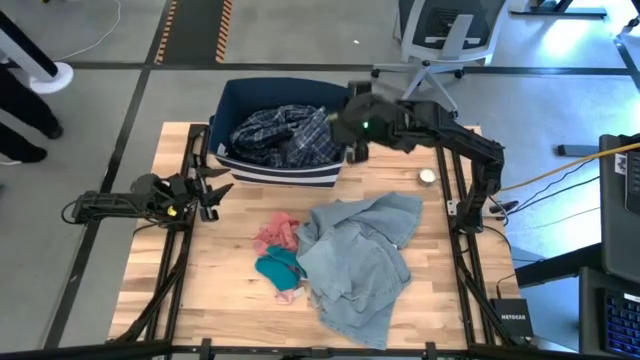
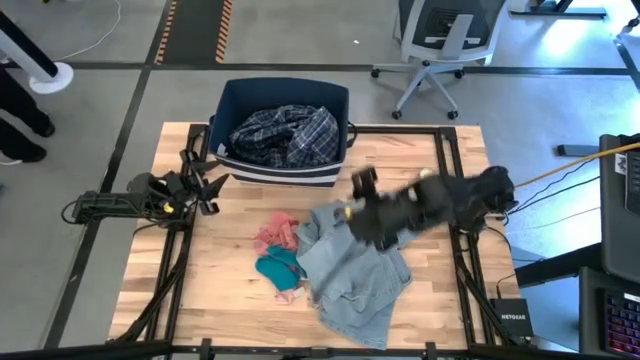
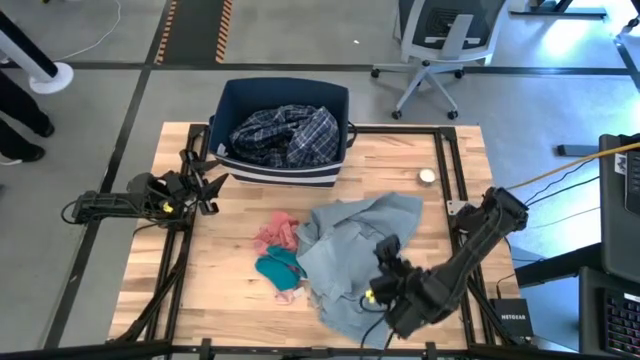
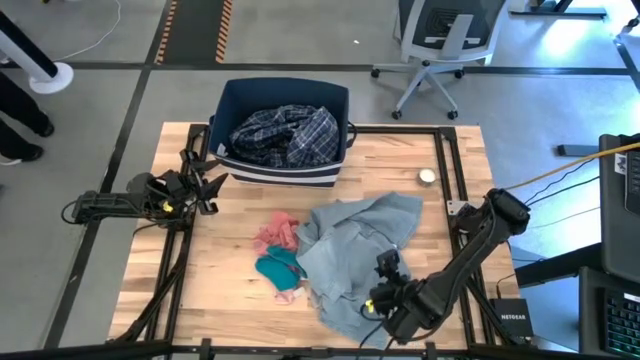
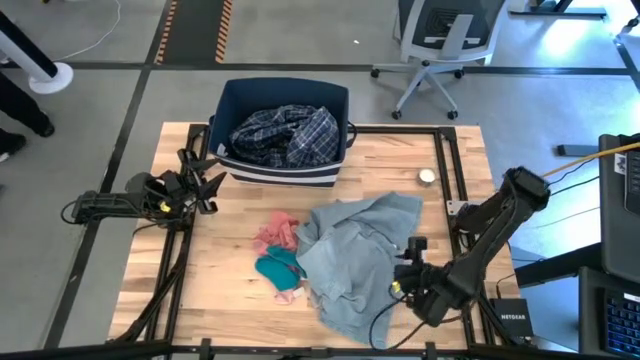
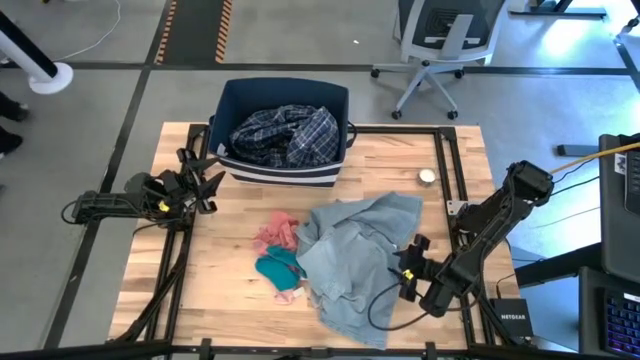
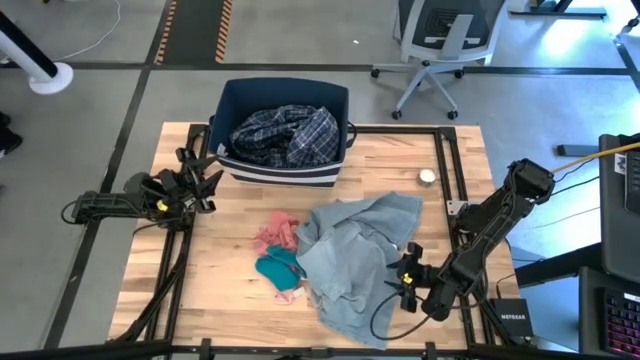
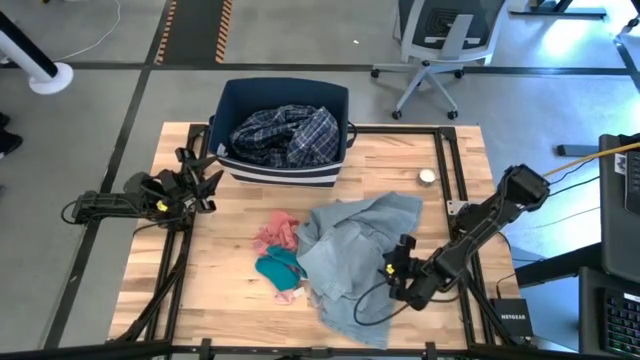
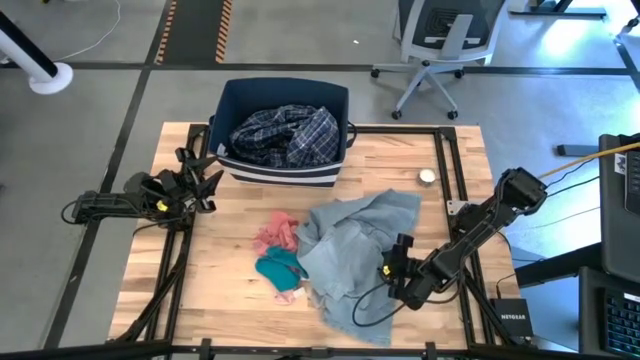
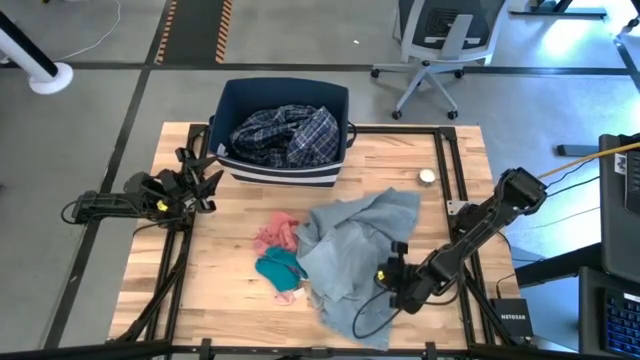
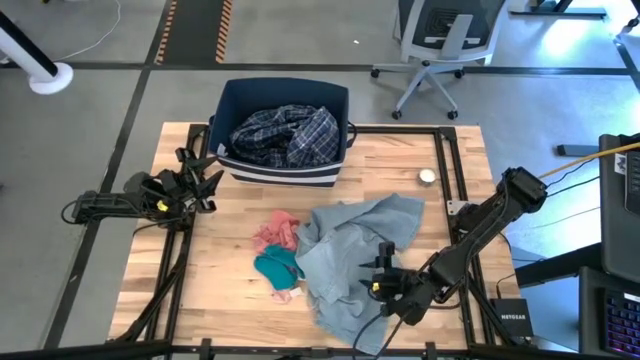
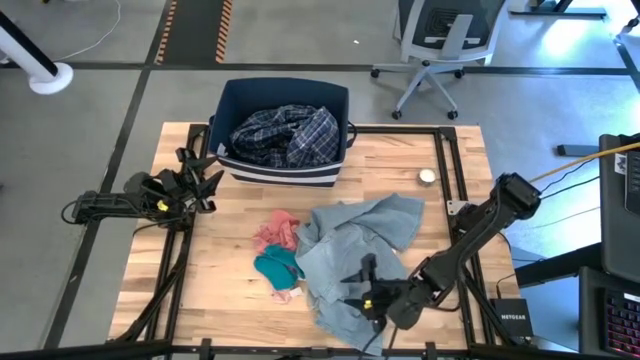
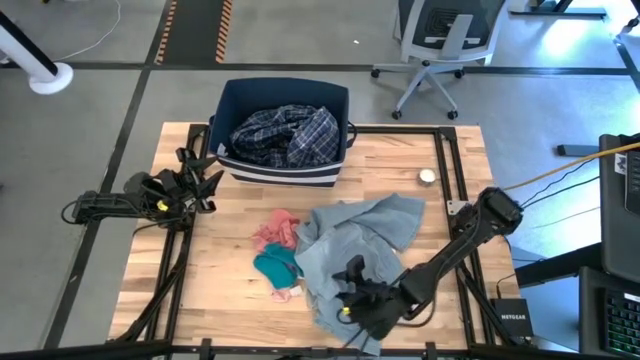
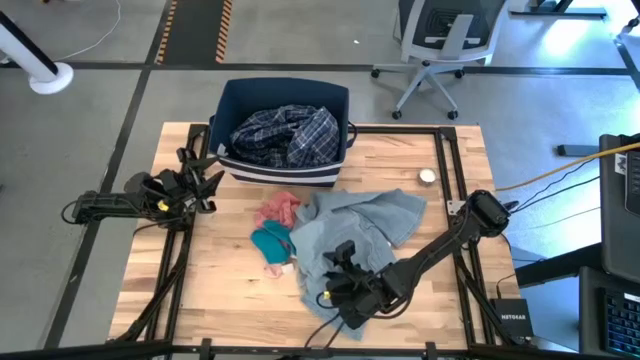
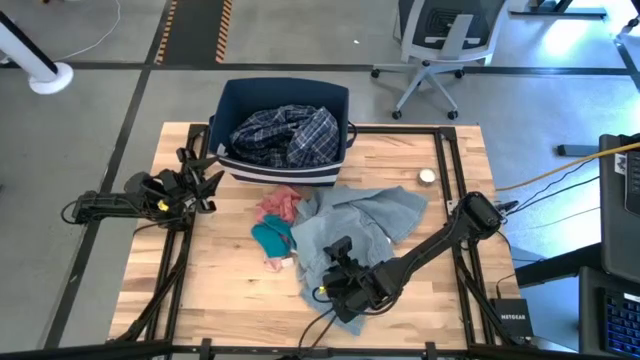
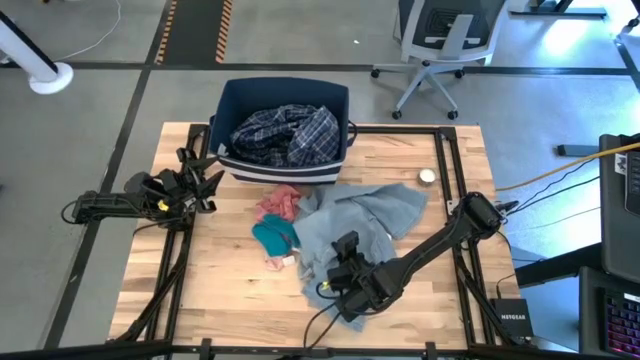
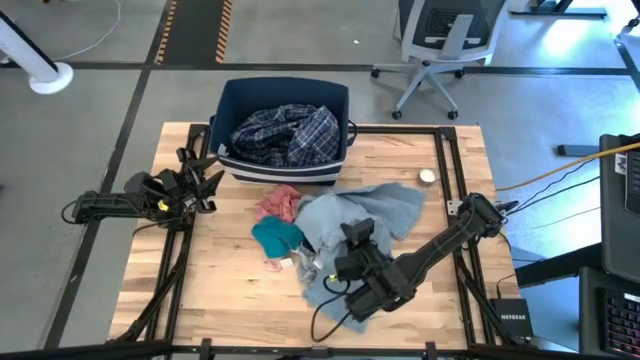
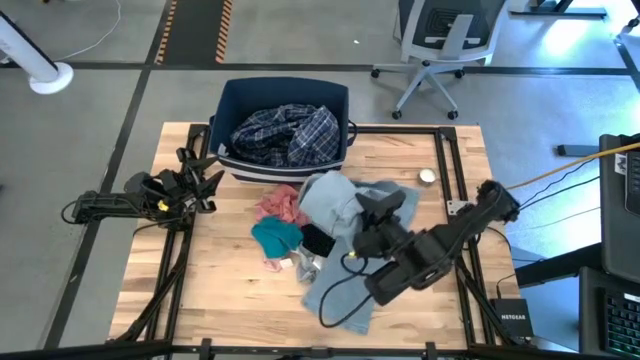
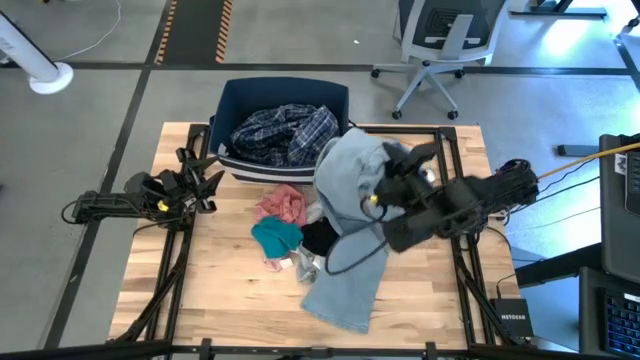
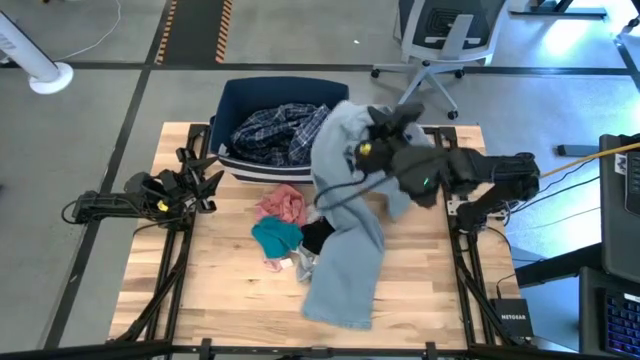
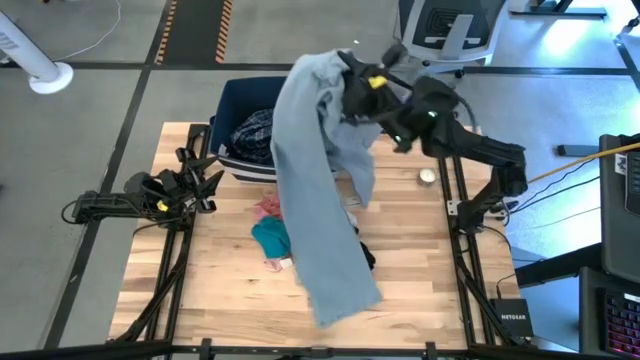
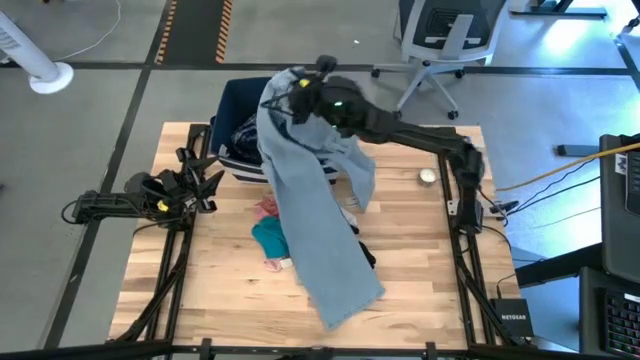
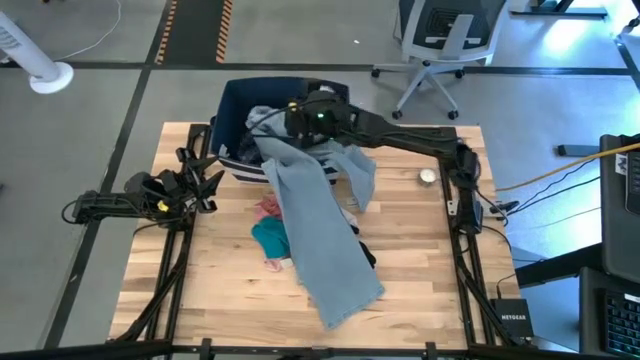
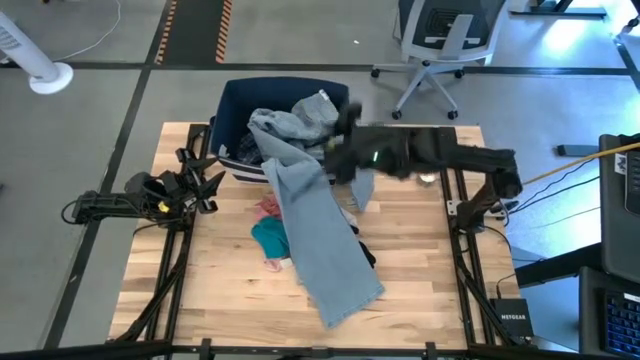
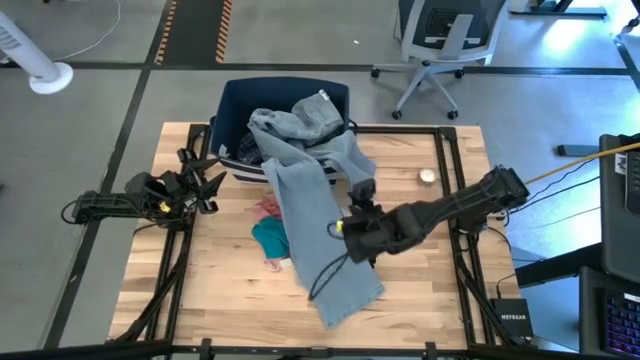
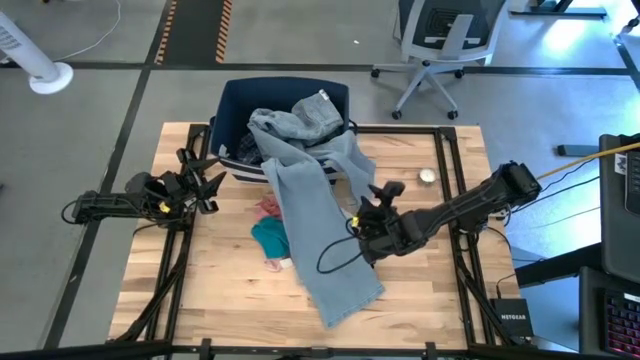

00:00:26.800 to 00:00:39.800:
Task: Sort clothes
Put the blue jeans into the blue laundry organizer

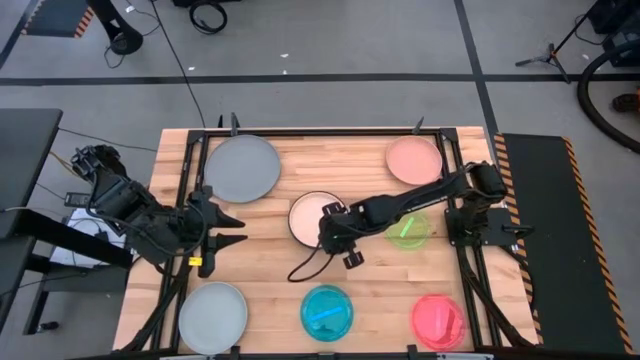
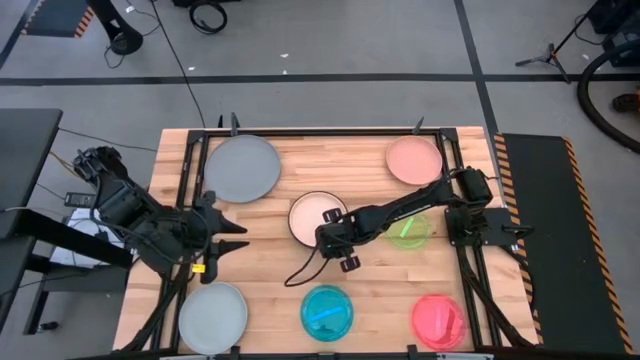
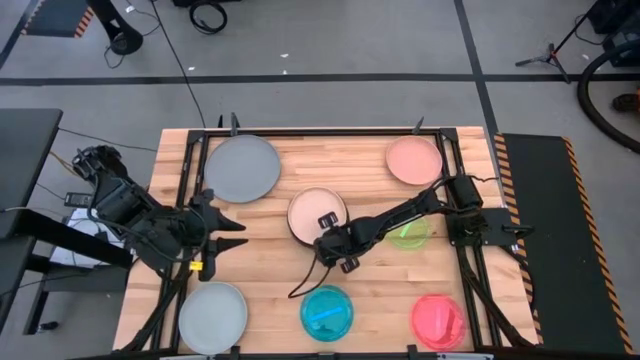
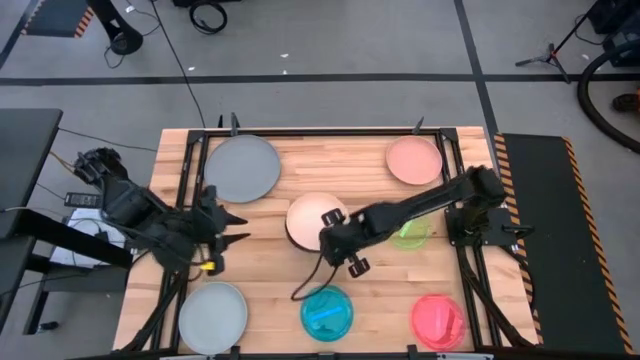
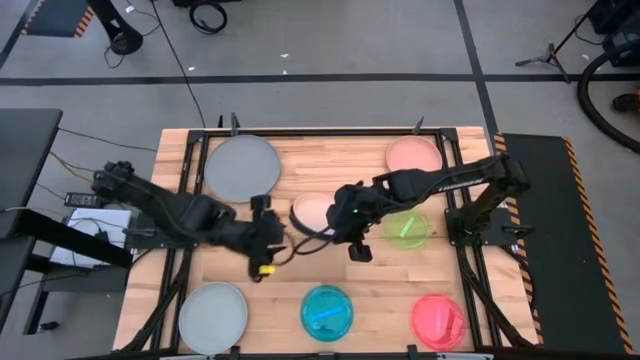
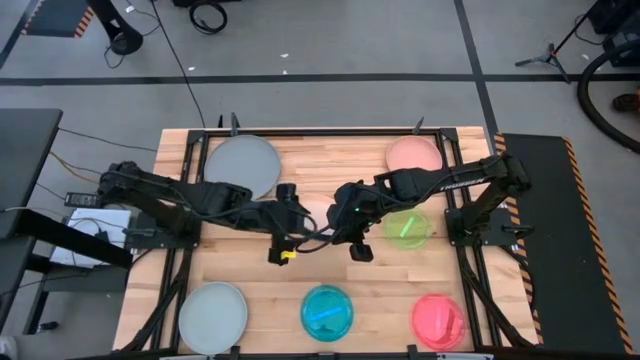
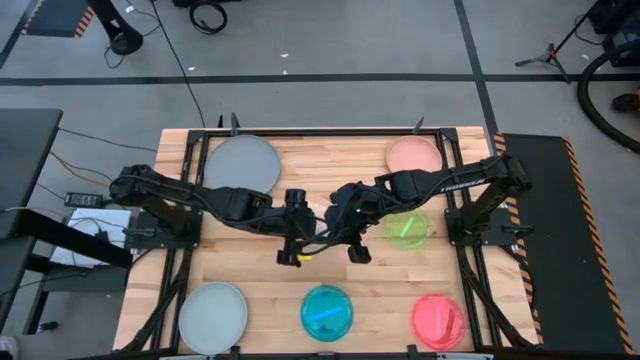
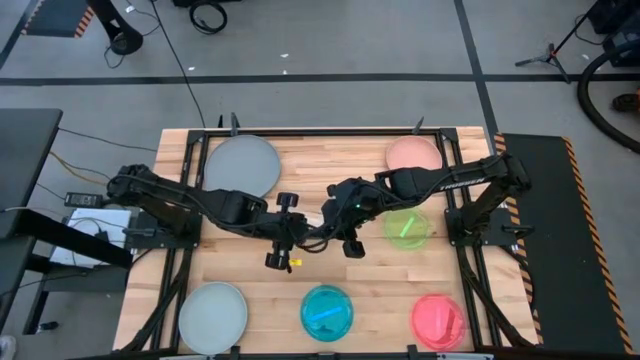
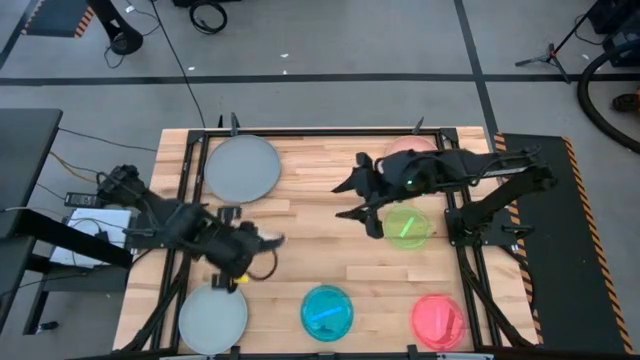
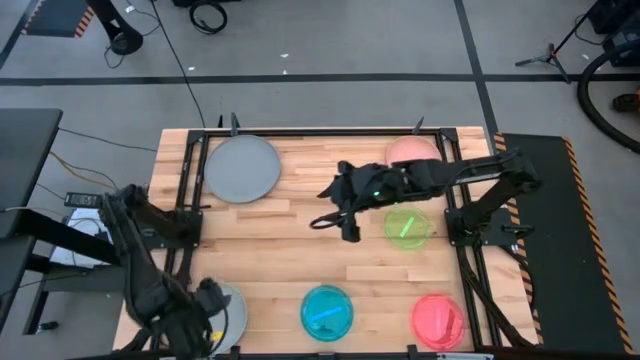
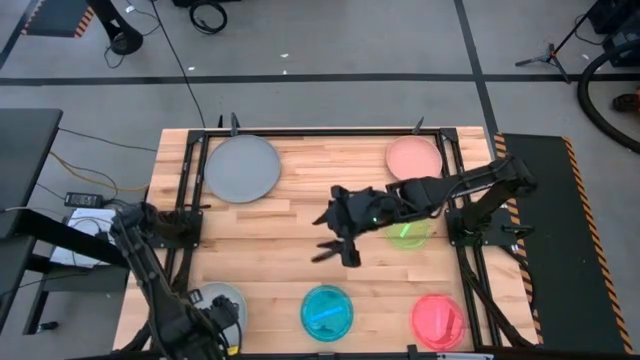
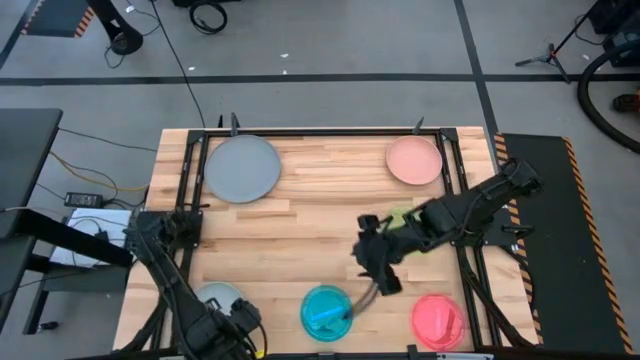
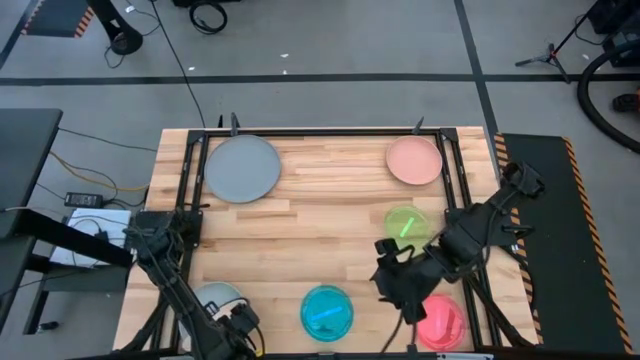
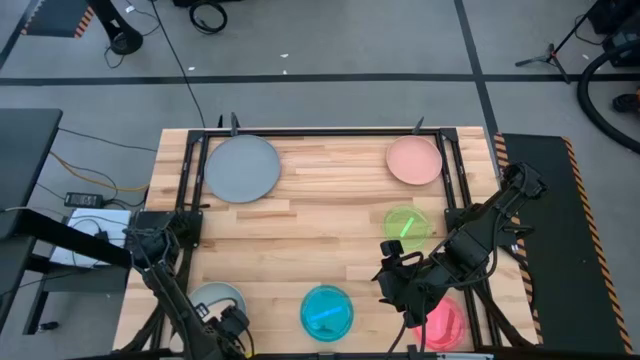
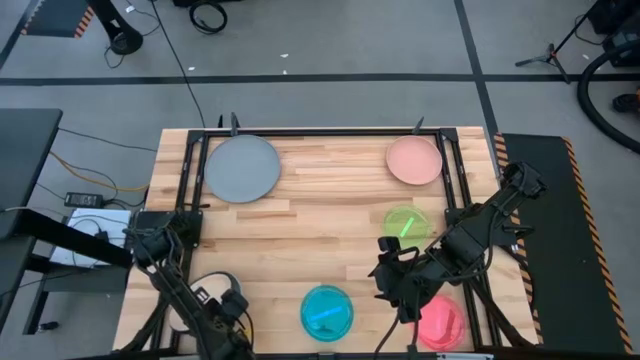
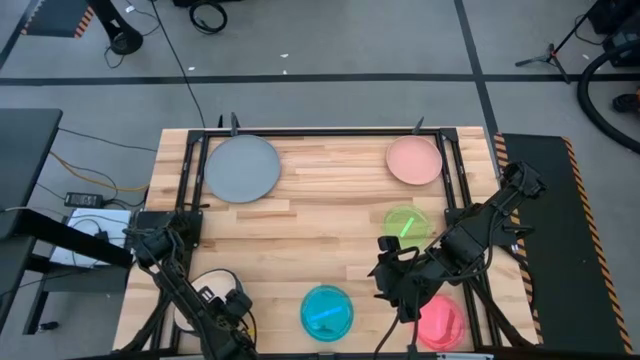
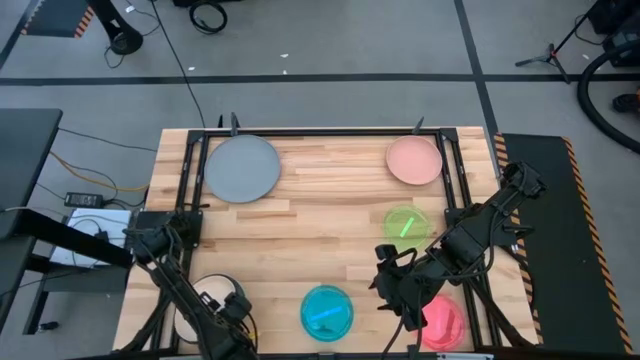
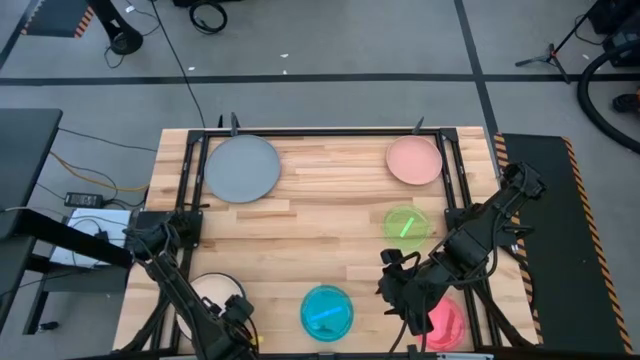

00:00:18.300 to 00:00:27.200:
Task: Stack plastic plates
Stack the stacked plates on the gray plate
